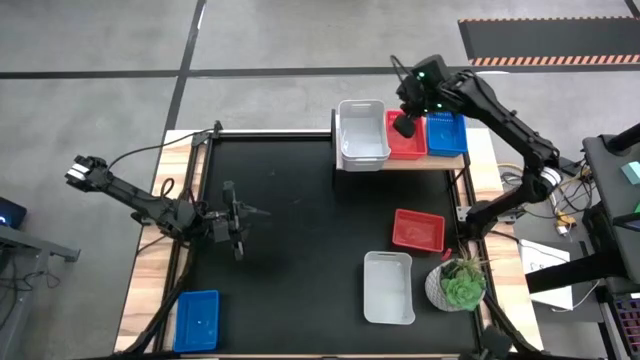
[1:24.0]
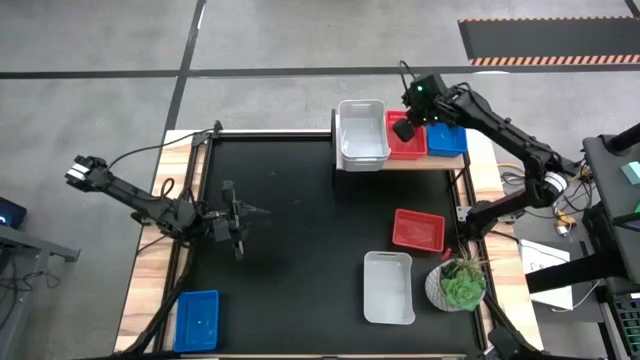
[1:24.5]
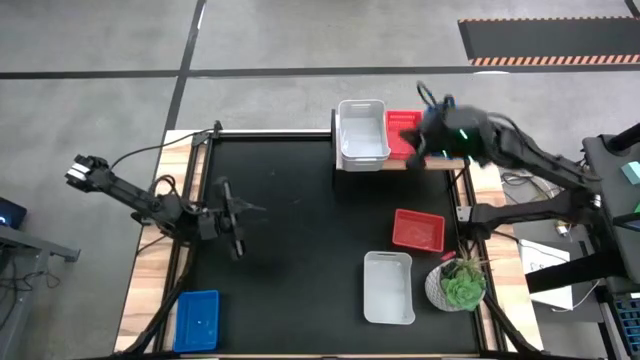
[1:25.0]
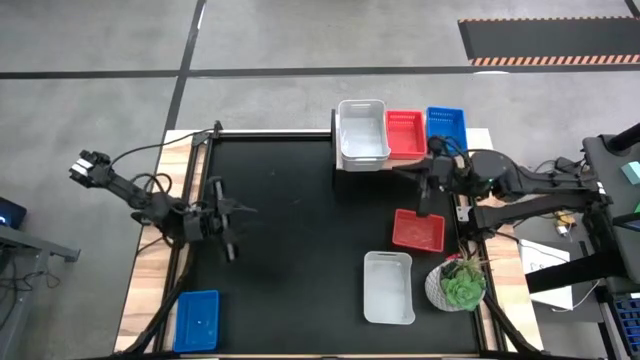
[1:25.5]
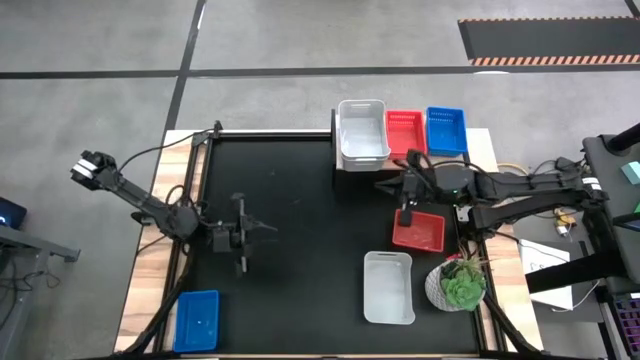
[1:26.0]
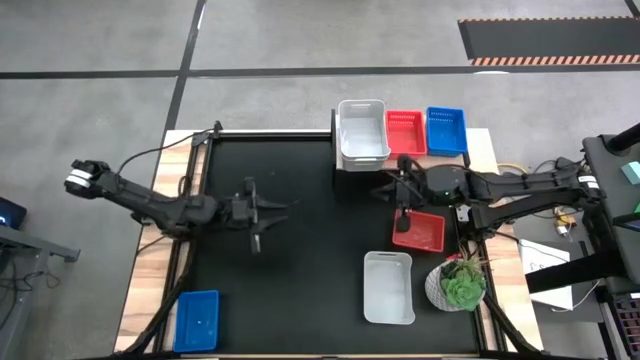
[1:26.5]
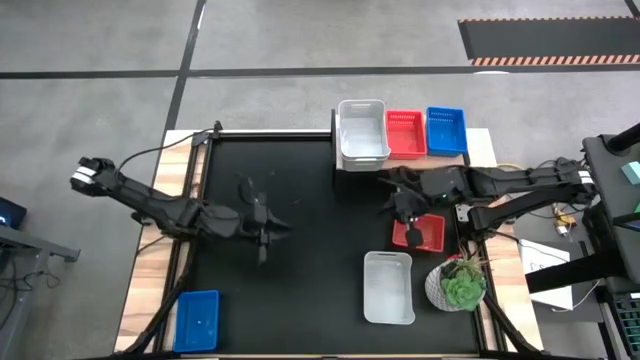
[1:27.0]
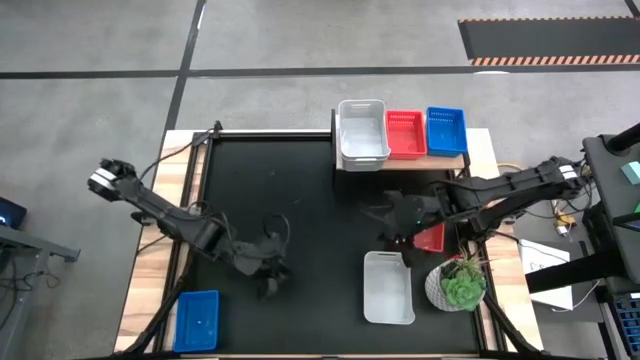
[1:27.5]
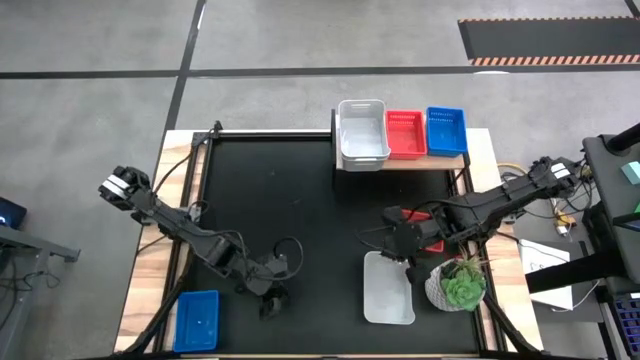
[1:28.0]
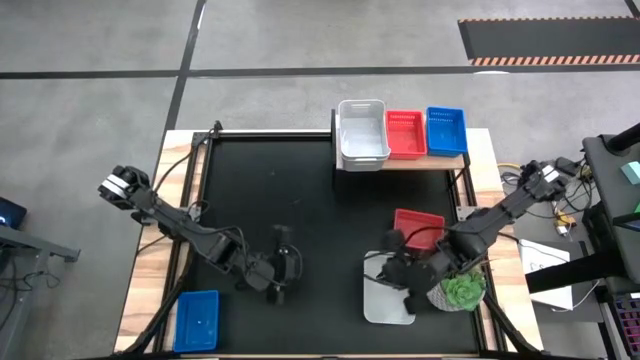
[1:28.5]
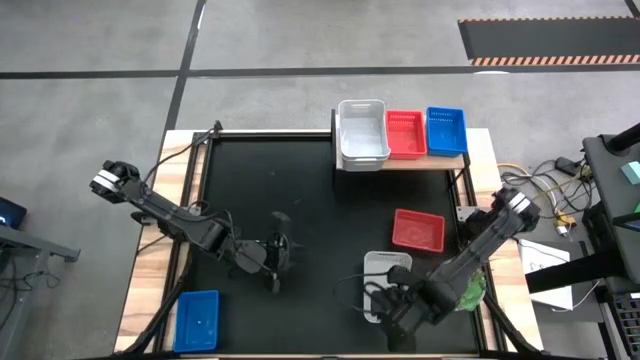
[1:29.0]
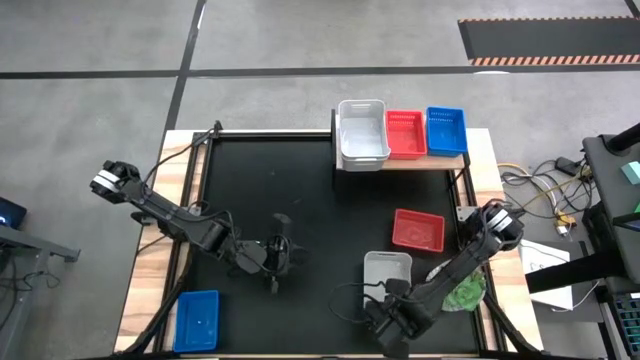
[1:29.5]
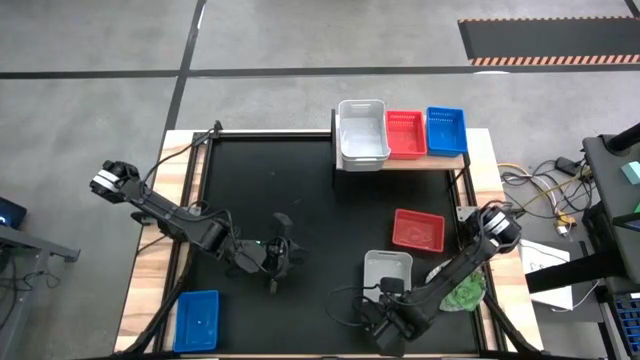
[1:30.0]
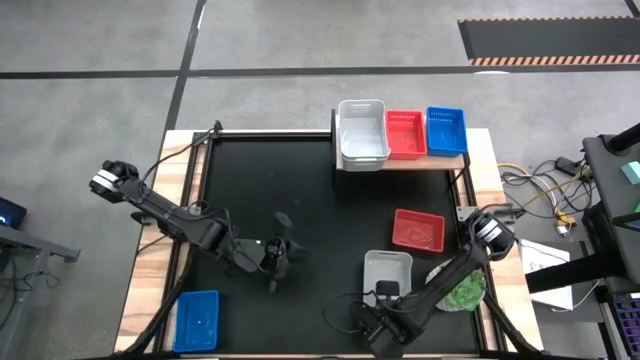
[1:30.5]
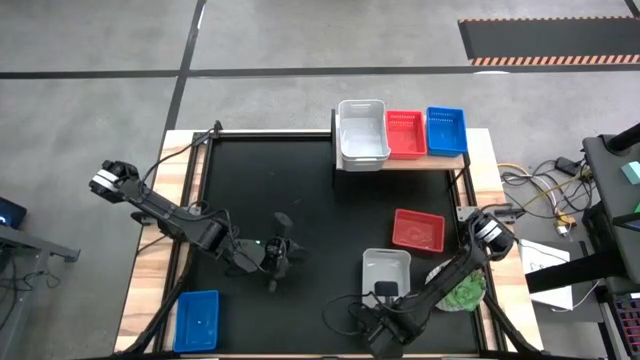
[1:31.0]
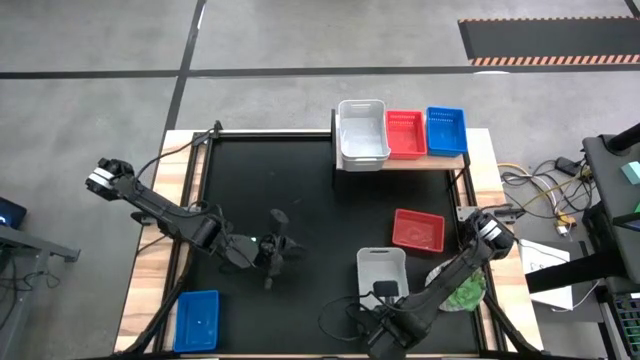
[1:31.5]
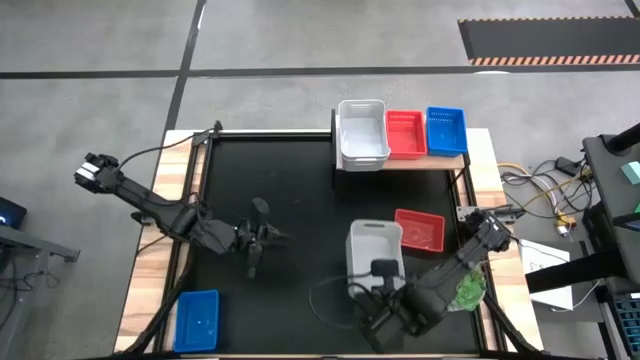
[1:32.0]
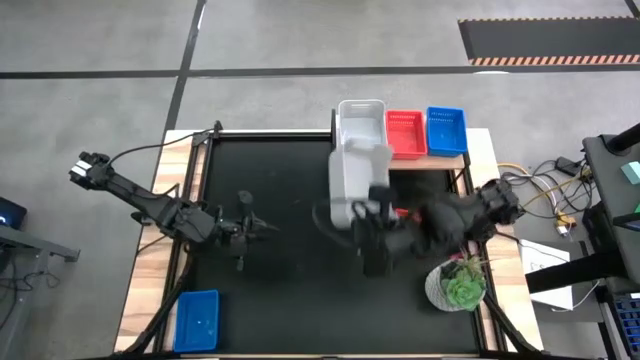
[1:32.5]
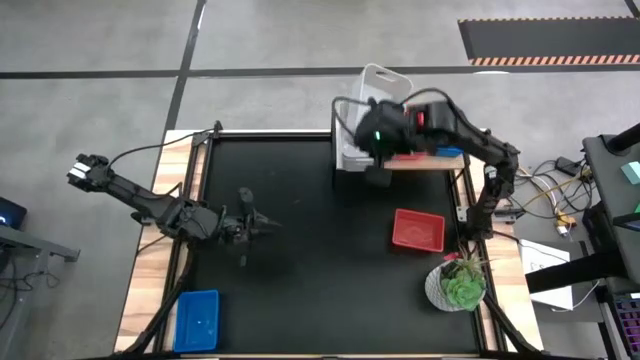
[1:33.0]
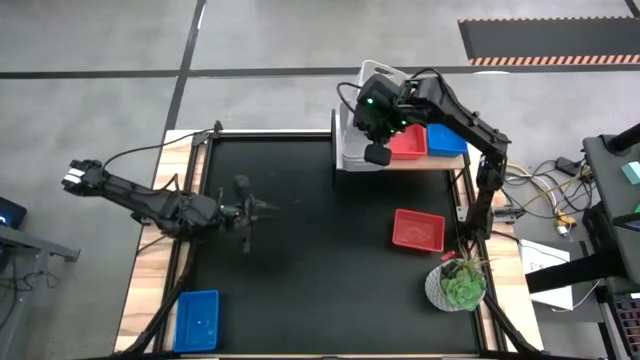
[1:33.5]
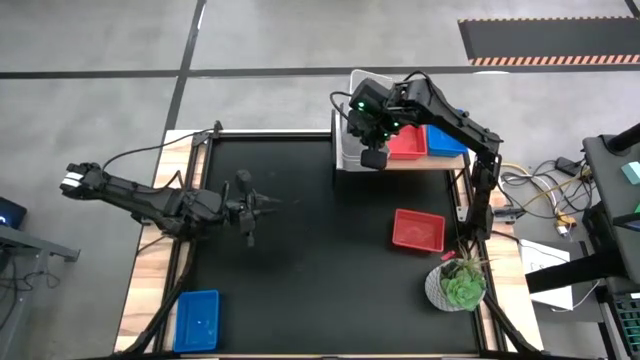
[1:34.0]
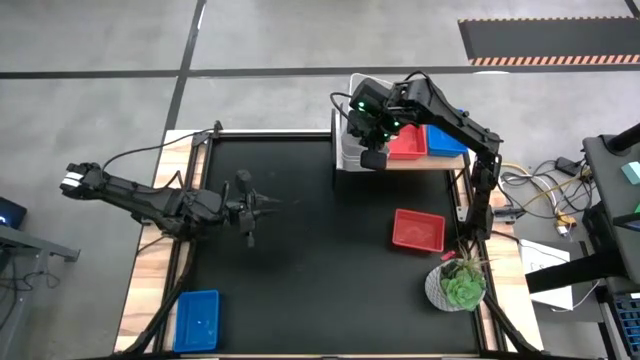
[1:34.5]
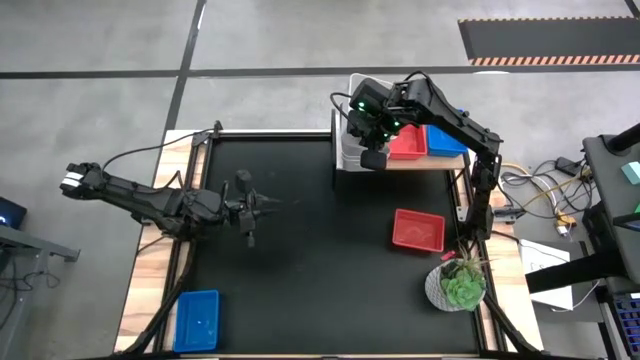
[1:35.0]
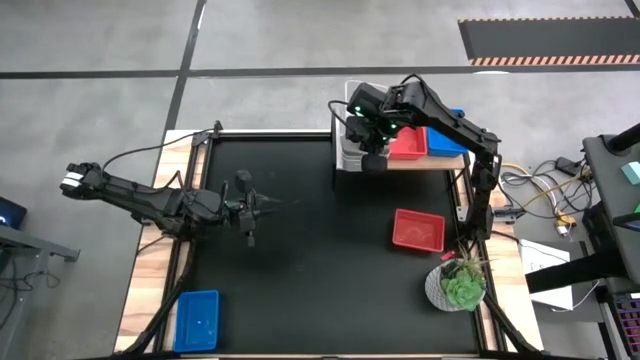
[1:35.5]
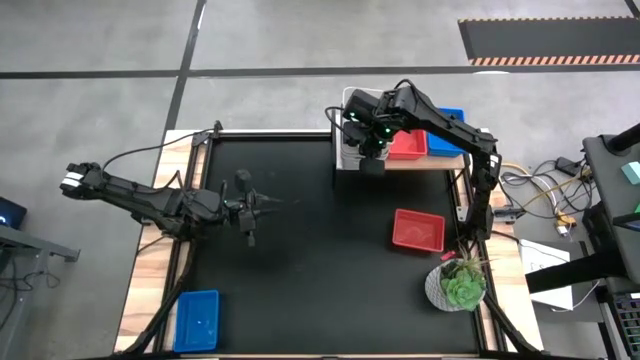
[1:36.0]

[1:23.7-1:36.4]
Task: Stack baskets on shelf by color
Stack the gray bin on top of the gray bins on the shelf

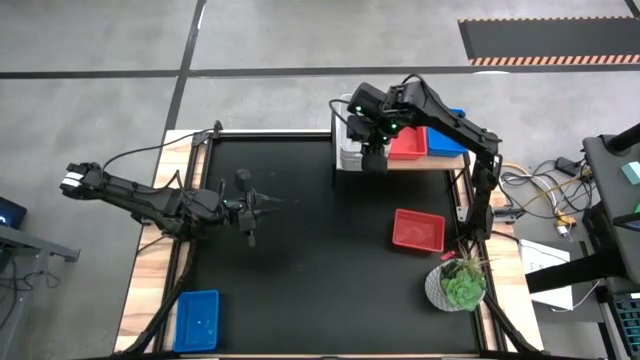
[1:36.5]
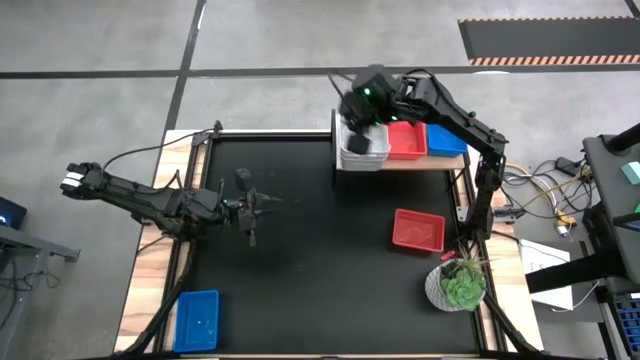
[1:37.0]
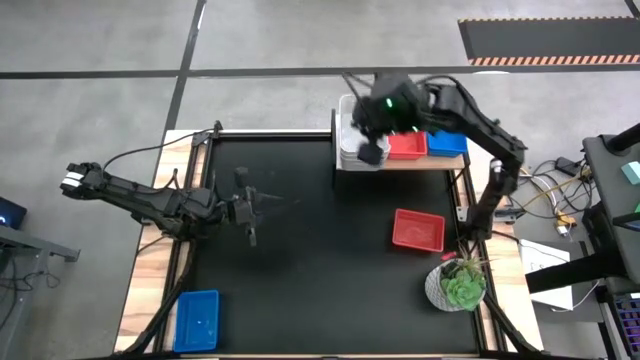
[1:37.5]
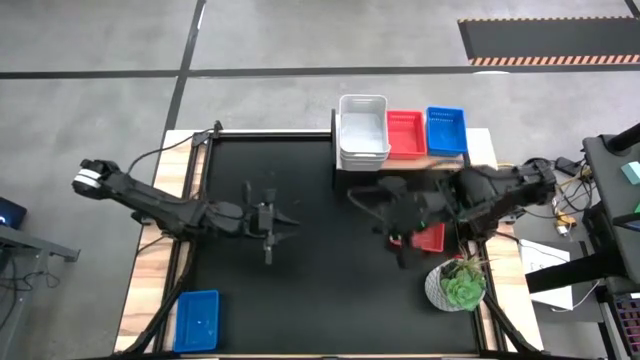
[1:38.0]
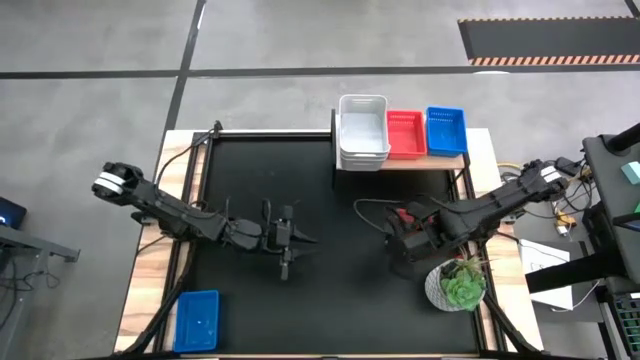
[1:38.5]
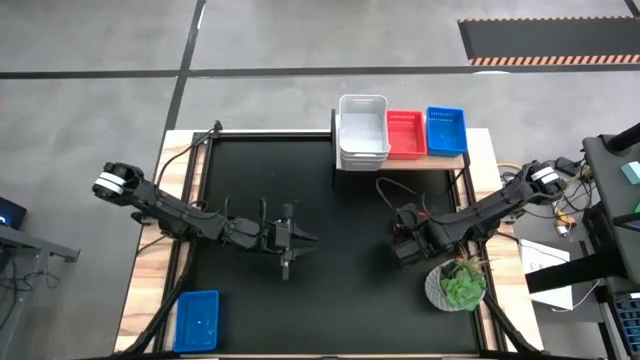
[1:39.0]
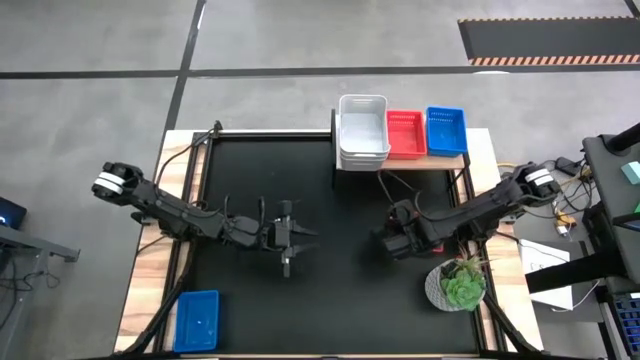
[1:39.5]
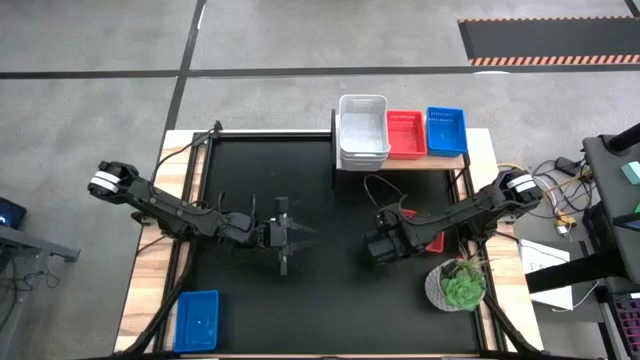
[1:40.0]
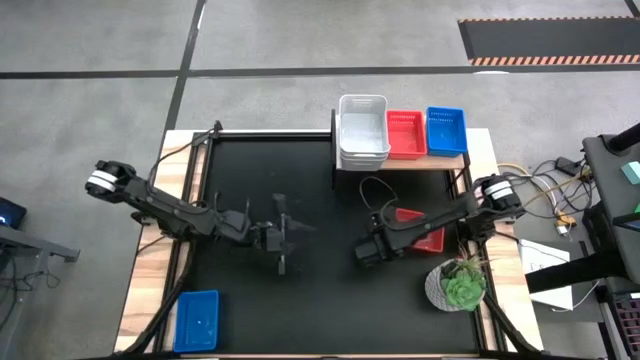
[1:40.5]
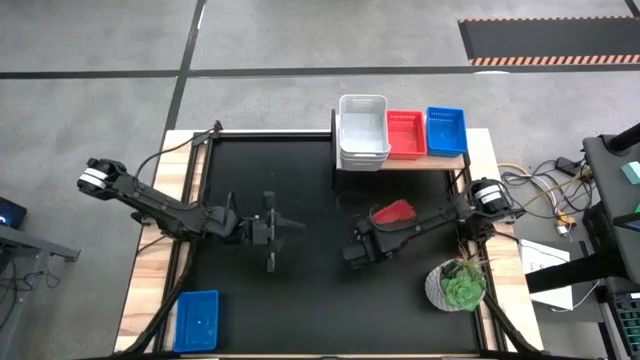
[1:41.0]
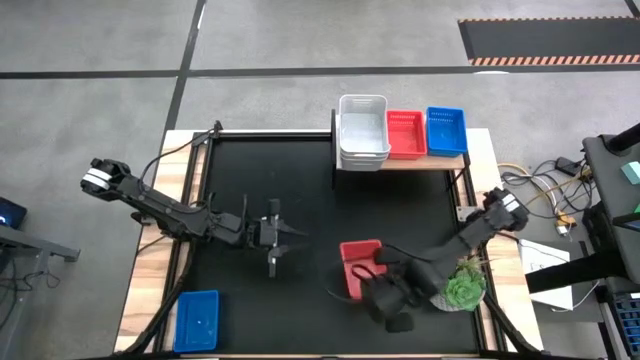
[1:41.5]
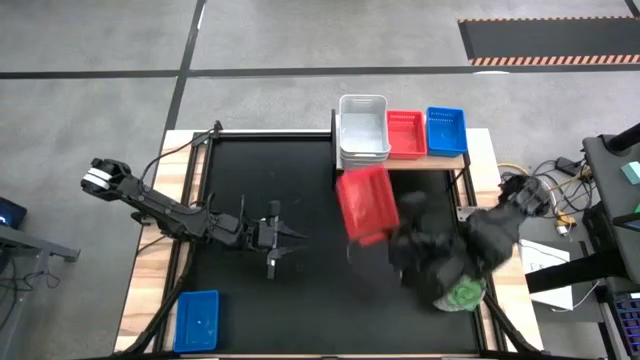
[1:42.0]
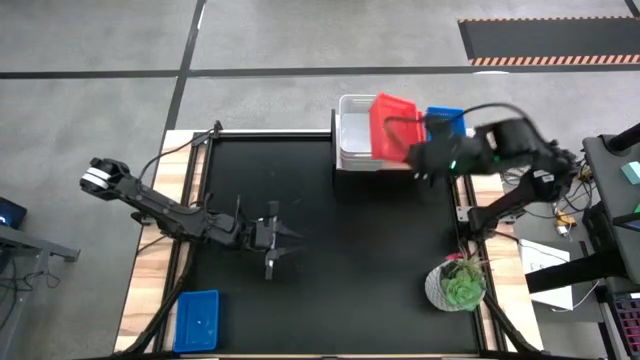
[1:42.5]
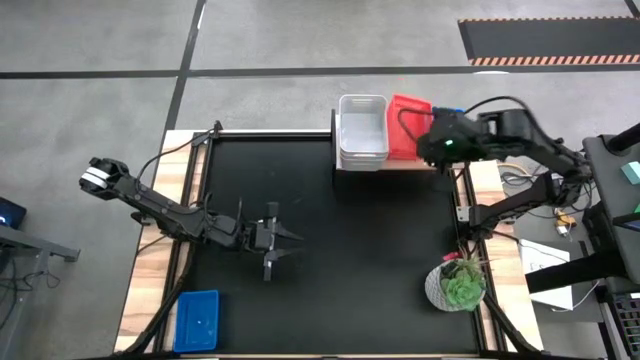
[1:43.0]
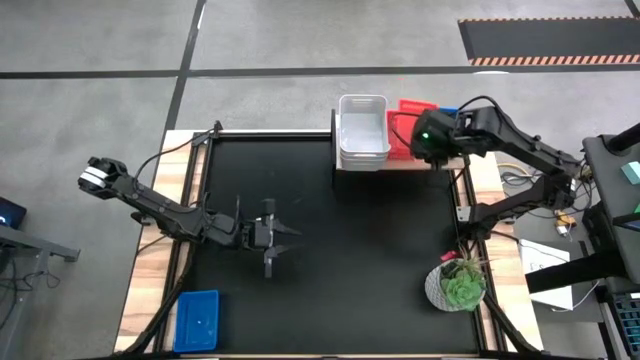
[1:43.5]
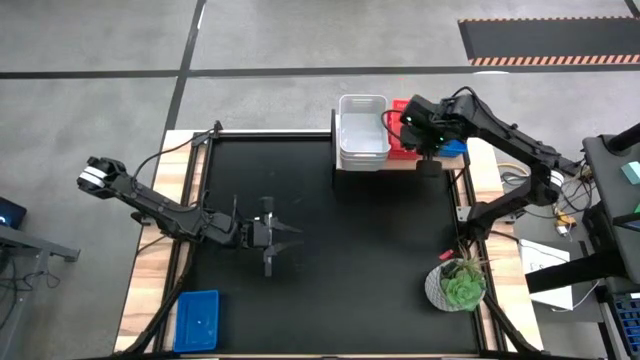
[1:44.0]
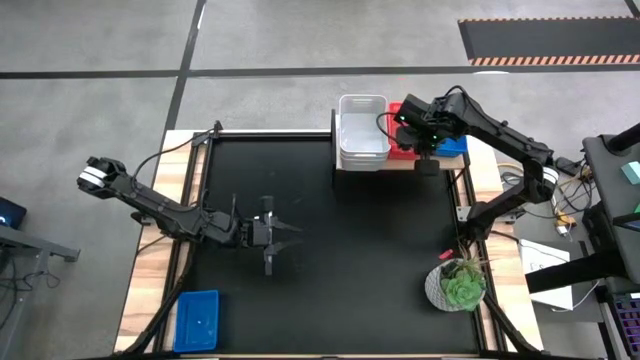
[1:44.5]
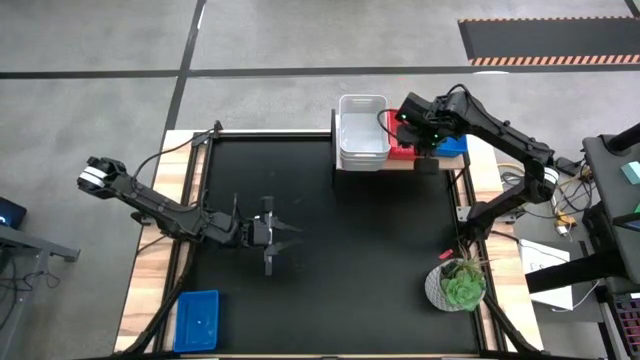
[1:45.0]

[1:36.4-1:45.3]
Stack the red bin on top of the red bins on the shelf
